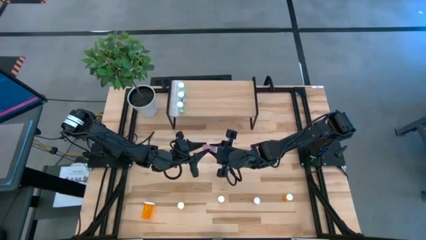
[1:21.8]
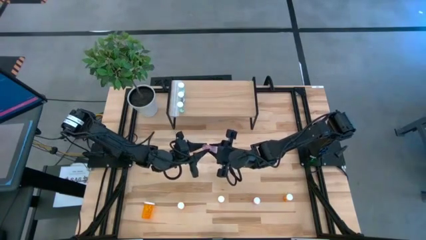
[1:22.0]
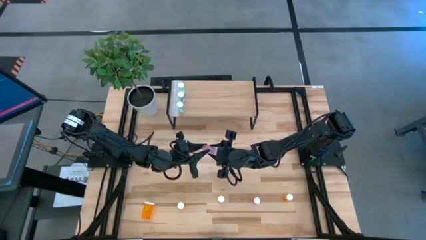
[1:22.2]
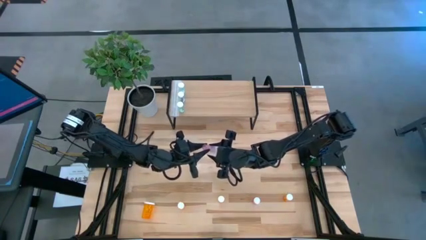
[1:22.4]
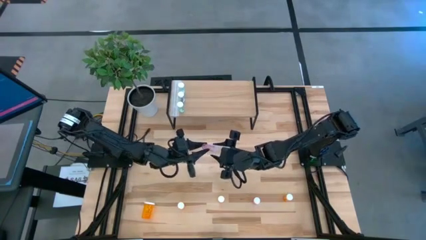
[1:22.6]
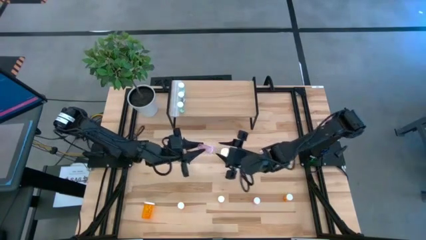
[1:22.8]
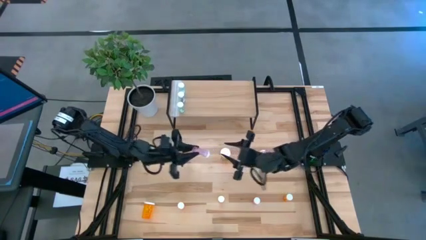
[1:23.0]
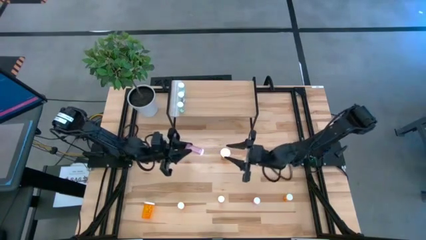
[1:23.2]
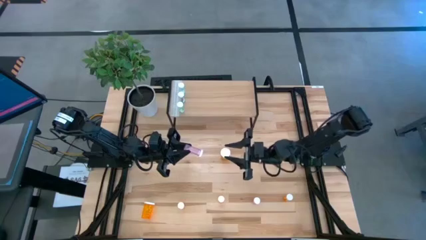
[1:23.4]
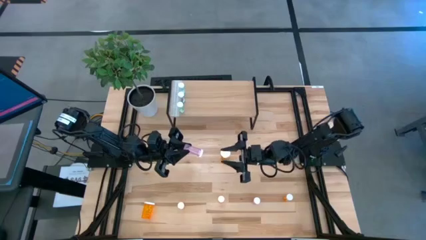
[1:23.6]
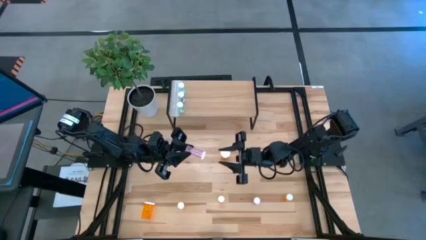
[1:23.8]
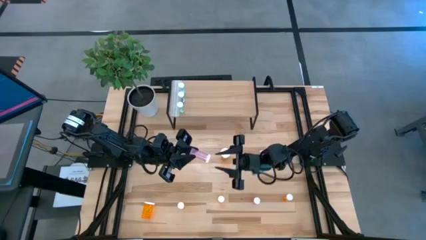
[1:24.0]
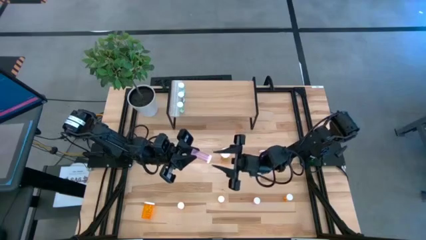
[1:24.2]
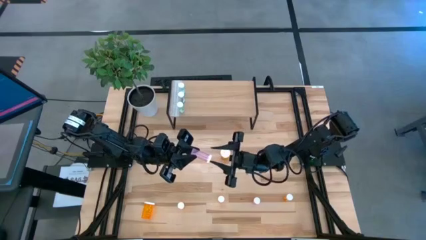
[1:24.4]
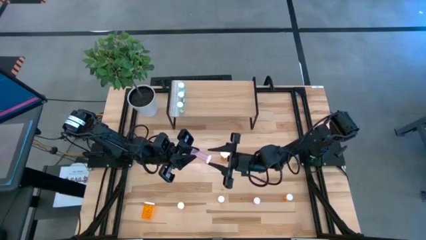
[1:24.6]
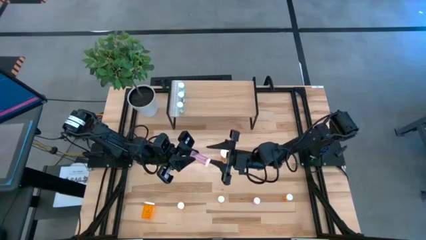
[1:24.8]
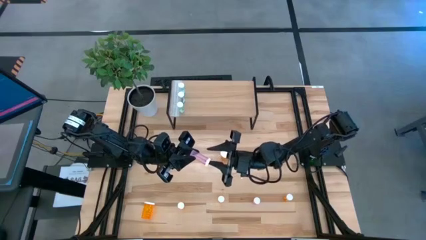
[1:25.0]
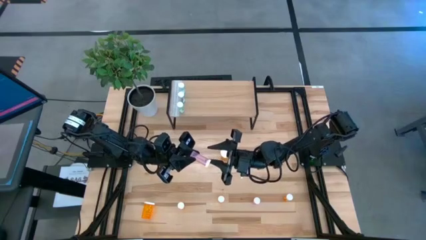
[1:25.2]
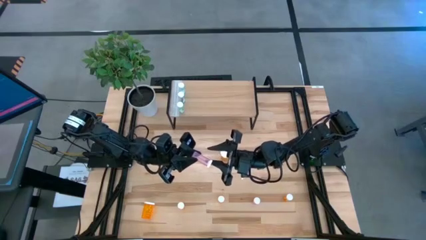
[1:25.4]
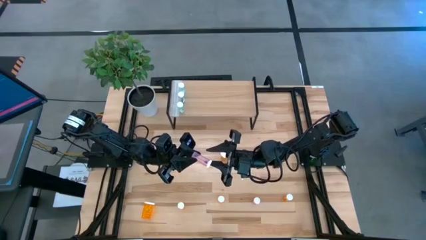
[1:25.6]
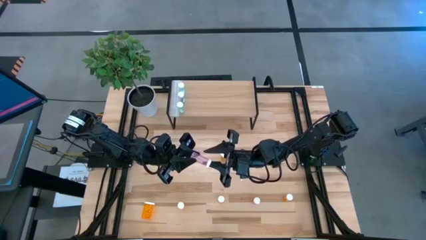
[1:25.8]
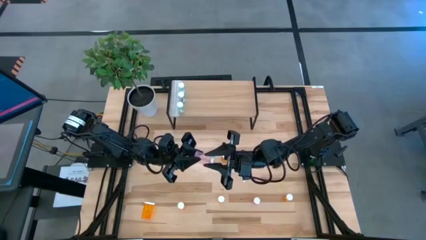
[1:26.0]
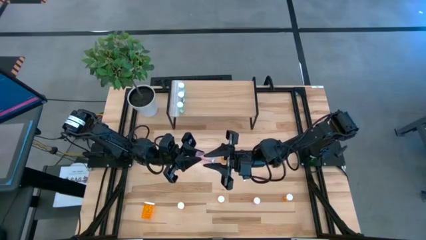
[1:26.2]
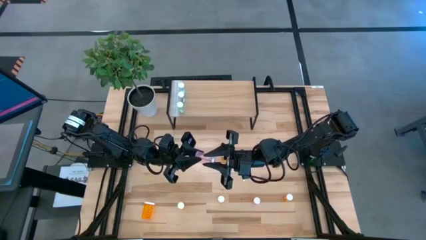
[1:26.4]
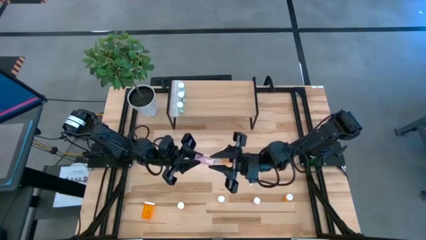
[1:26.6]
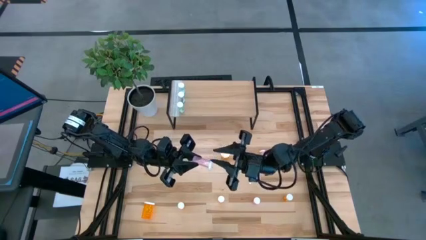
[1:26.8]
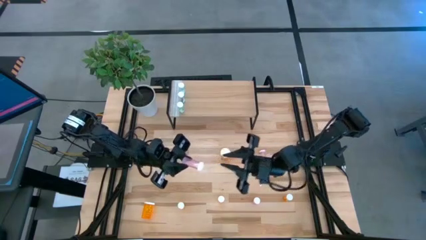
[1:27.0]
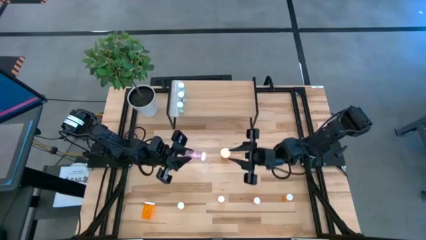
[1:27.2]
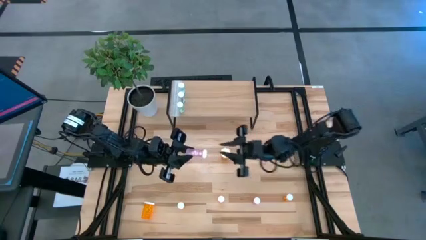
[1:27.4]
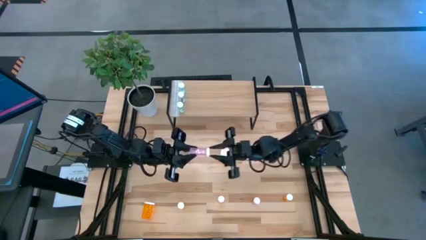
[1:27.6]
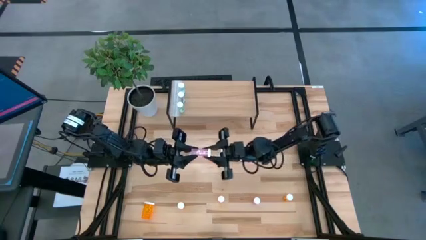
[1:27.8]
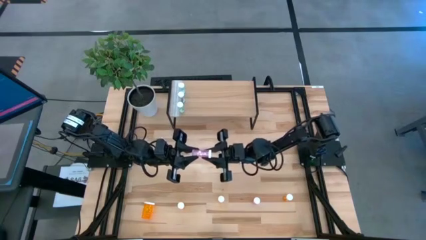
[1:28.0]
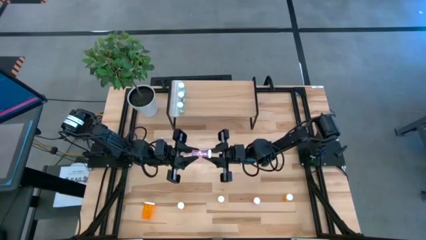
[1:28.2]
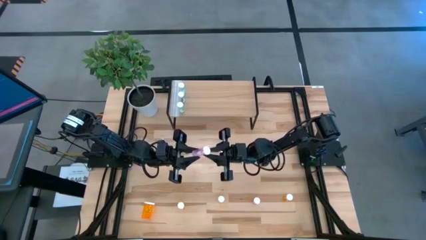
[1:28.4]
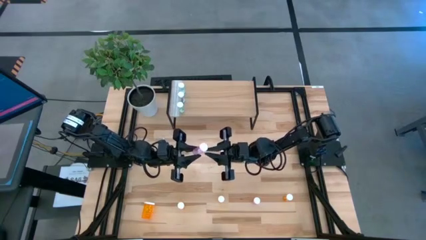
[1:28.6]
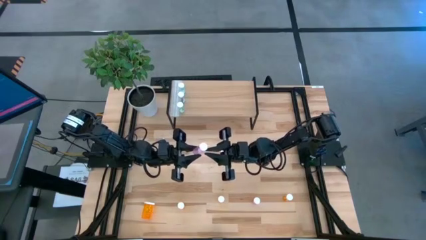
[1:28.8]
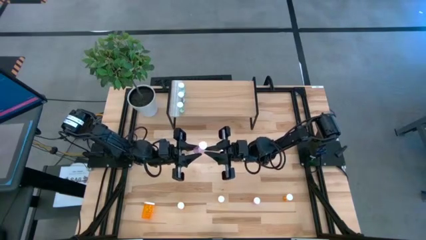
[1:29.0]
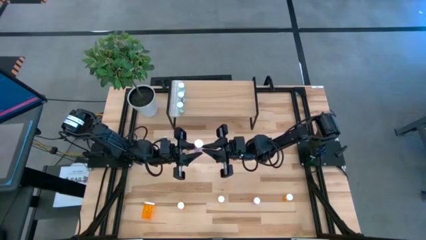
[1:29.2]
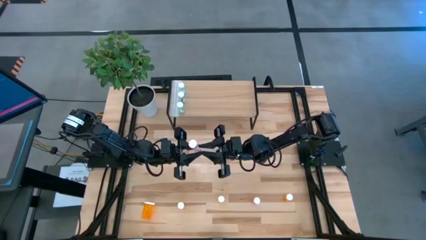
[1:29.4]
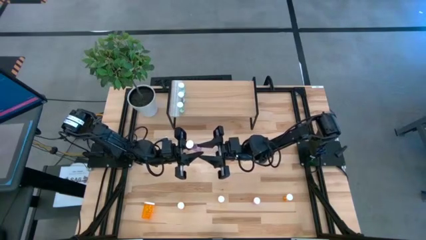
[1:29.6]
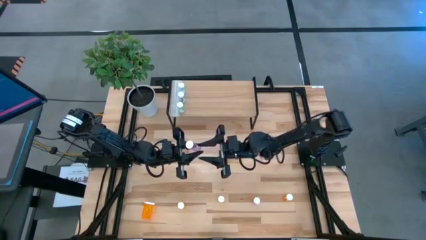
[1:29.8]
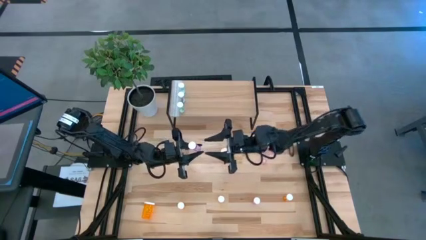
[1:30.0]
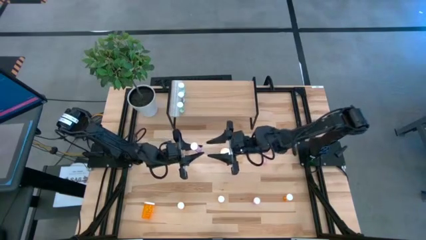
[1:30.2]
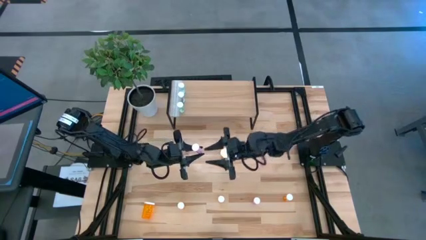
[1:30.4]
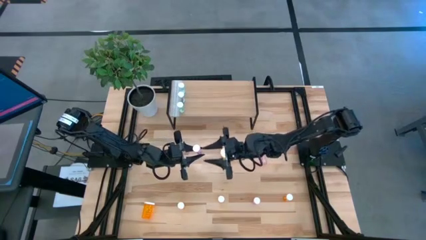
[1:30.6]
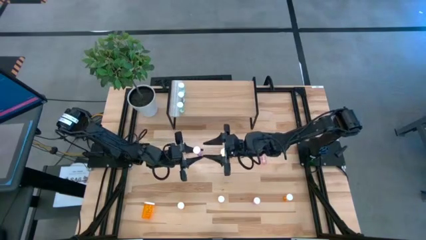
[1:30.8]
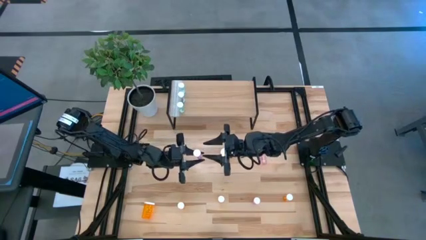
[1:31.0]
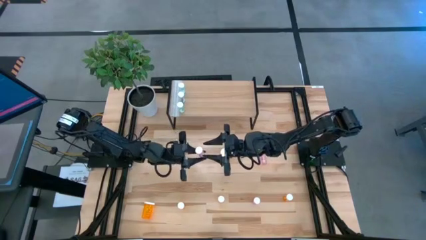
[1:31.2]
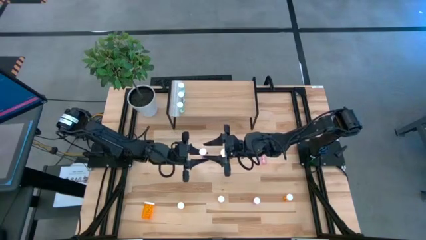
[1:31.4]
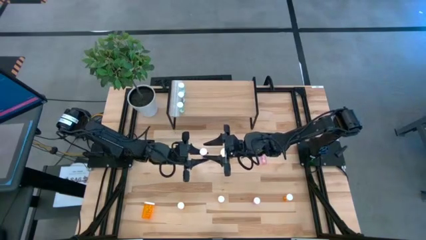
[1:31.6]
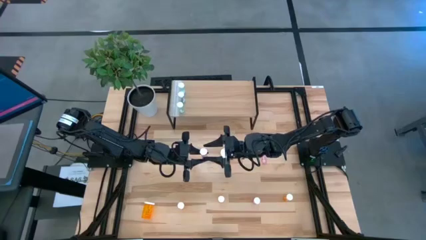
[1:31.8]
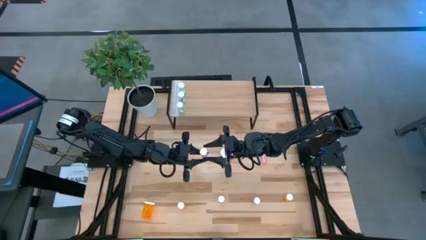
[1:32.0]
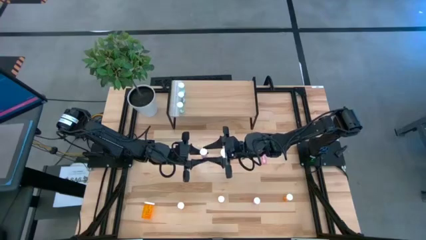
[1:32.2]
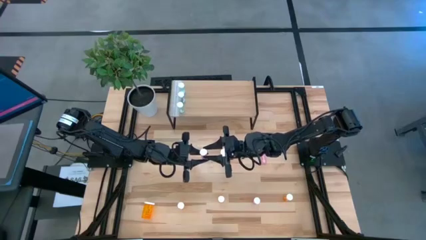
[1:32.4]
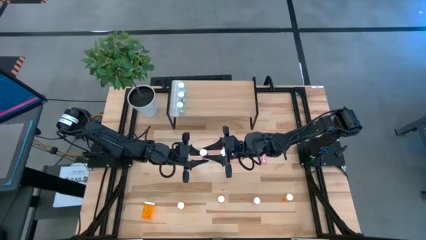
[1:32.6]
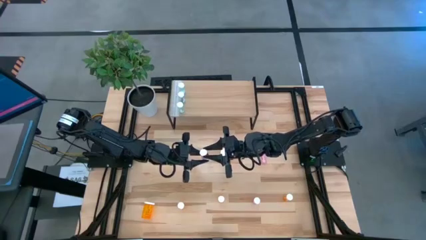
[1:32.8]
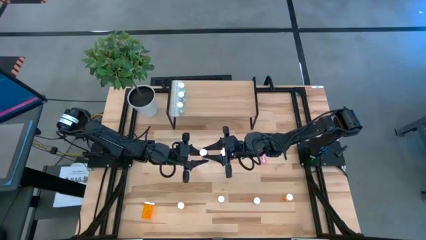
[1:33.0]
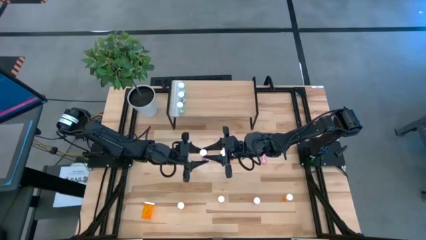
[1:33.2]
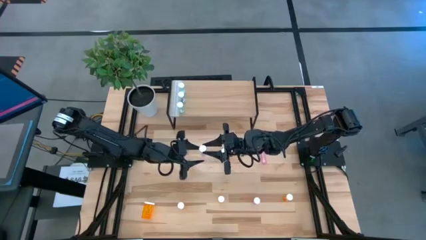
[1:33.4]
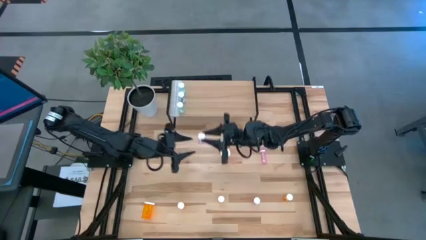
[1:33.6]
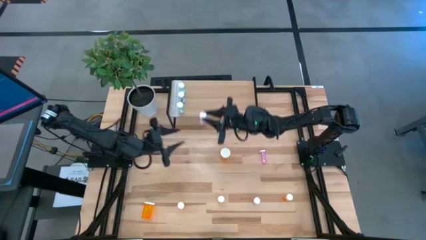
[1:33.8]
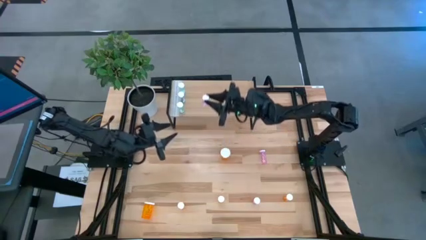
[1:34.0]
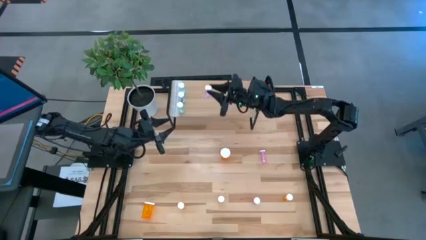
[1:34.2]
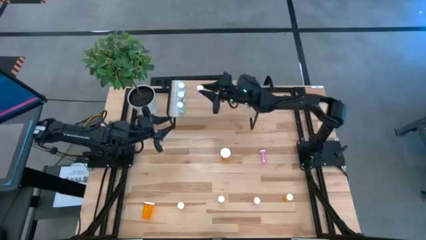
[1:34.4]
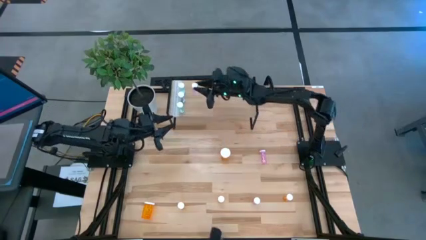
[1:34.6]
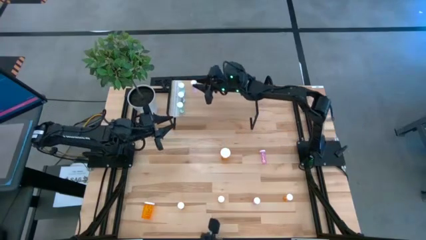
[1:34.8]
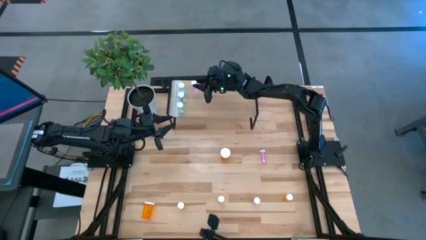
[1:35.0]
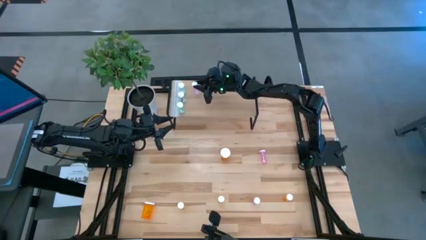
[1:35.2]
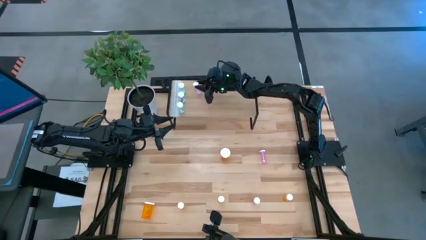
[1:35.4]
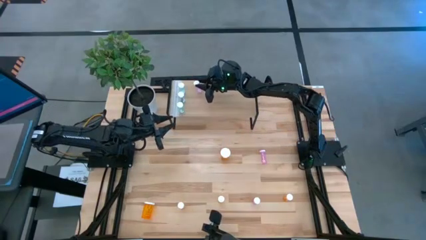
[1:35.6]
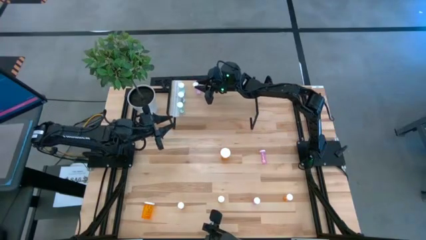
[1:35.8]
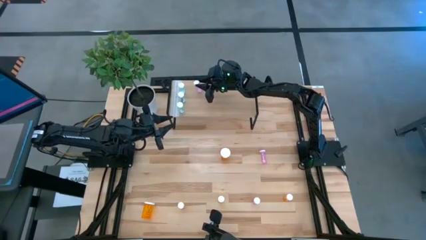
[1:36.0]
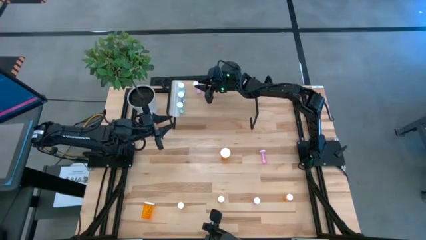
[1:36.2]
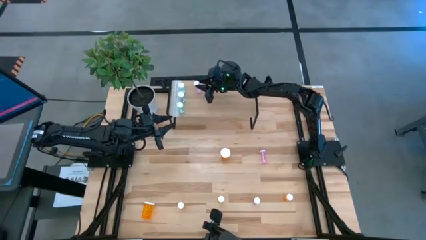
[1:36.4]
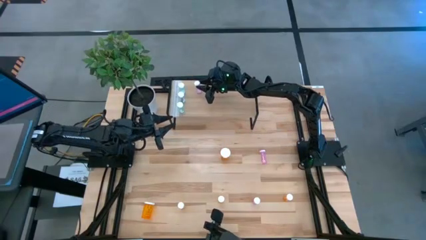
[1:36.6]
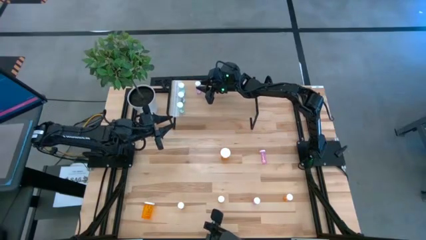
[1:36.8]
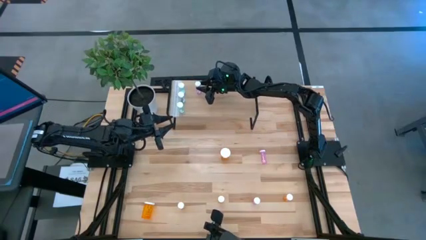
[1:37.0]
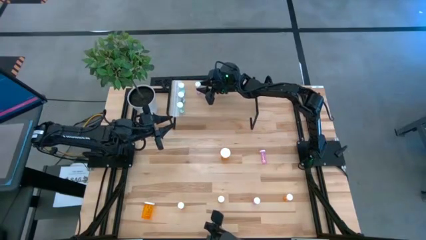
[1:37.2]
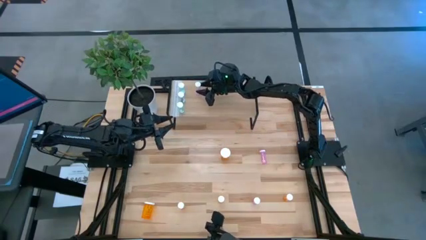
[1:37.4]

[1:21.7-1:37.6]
Task: Pick and place medicine bottles onto shelf by color
Put the top pink pill bottle on the shelf
